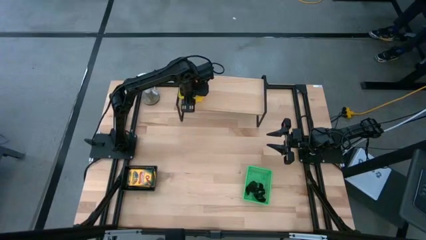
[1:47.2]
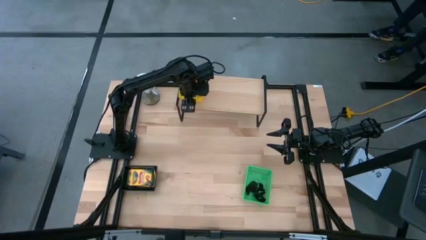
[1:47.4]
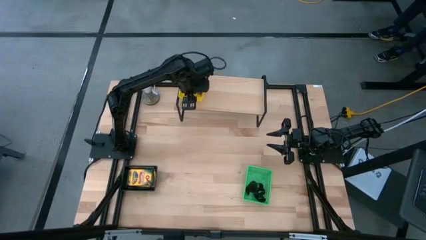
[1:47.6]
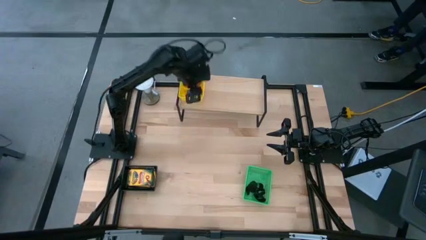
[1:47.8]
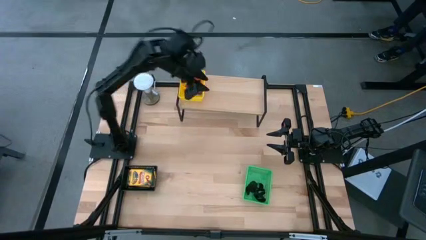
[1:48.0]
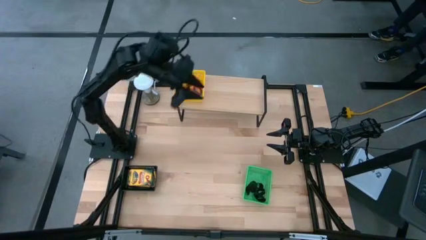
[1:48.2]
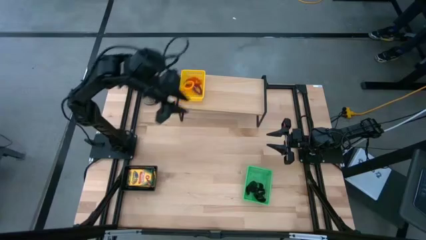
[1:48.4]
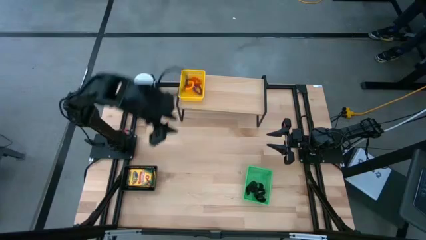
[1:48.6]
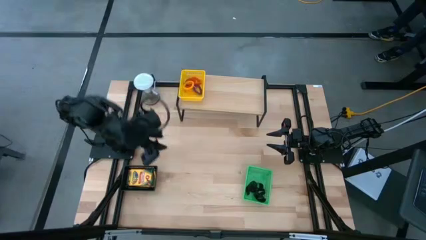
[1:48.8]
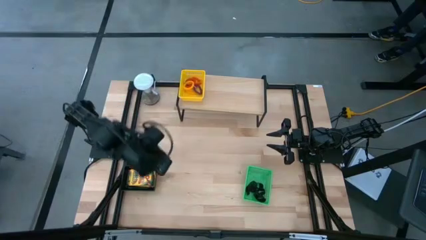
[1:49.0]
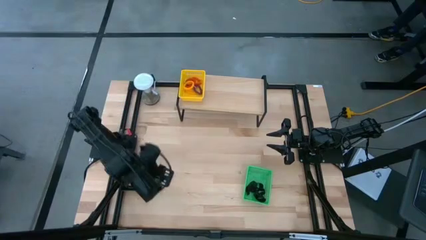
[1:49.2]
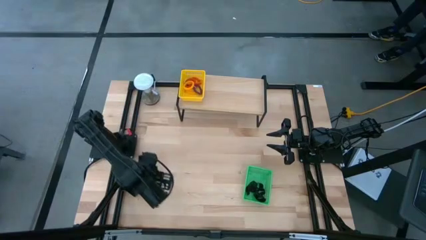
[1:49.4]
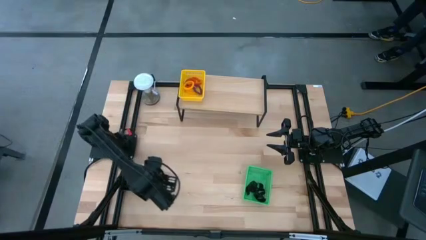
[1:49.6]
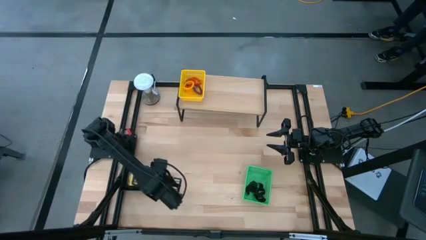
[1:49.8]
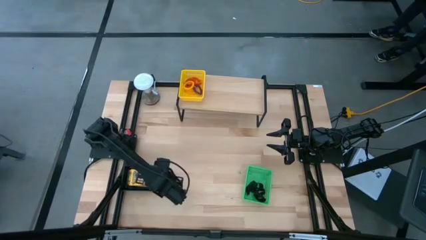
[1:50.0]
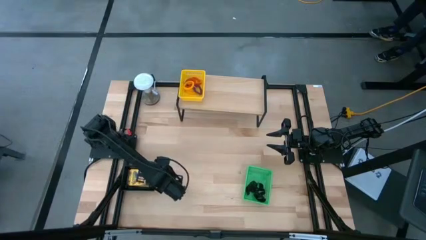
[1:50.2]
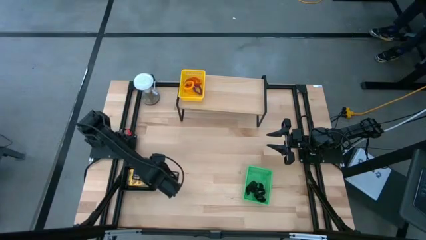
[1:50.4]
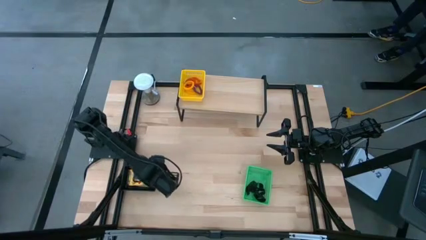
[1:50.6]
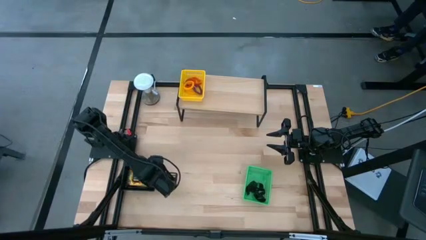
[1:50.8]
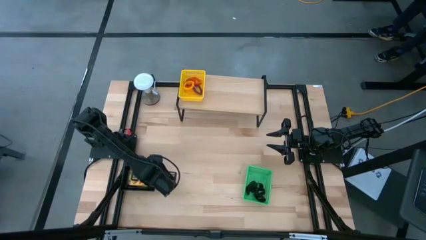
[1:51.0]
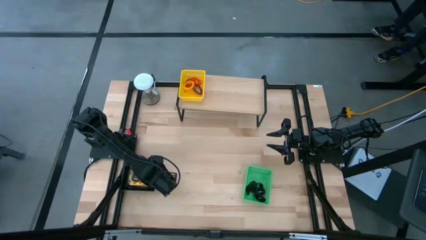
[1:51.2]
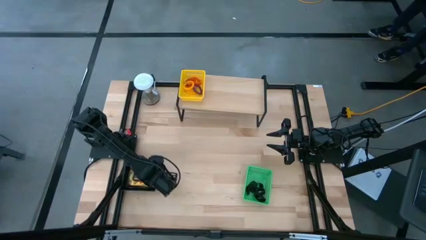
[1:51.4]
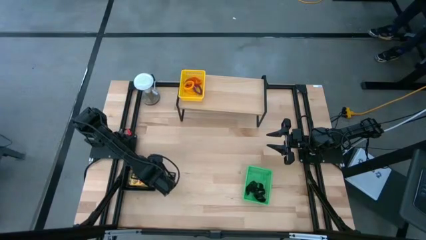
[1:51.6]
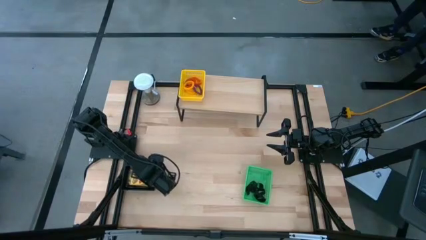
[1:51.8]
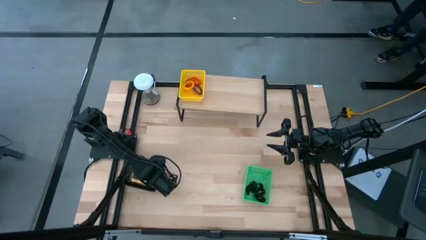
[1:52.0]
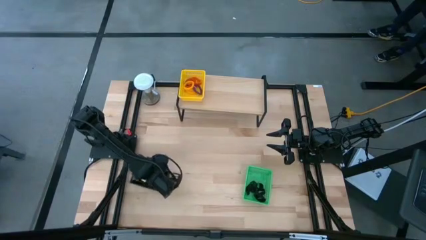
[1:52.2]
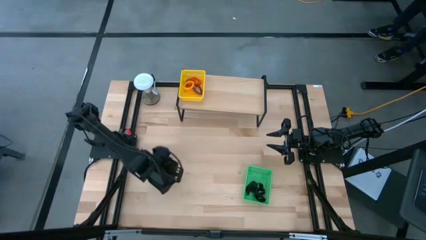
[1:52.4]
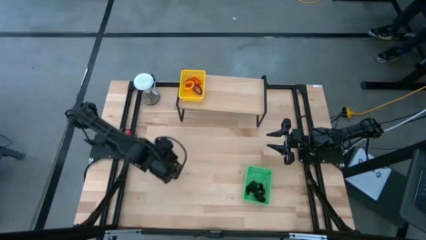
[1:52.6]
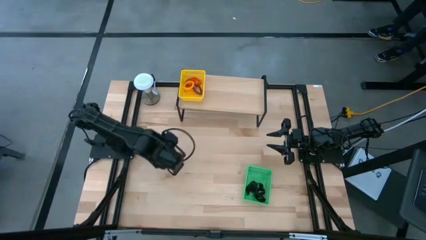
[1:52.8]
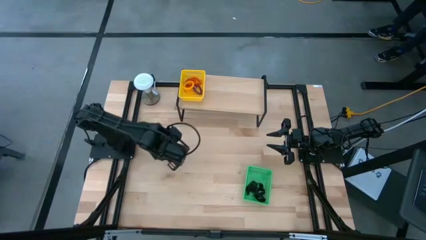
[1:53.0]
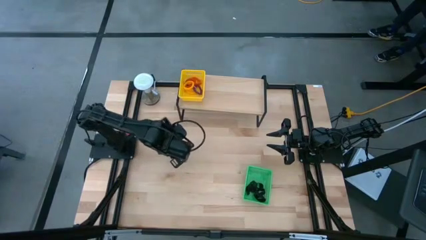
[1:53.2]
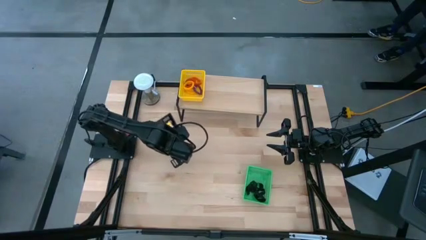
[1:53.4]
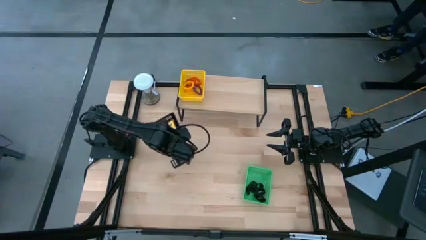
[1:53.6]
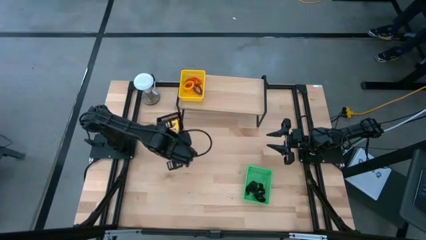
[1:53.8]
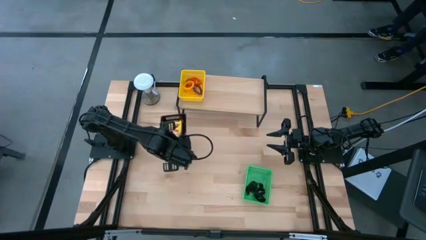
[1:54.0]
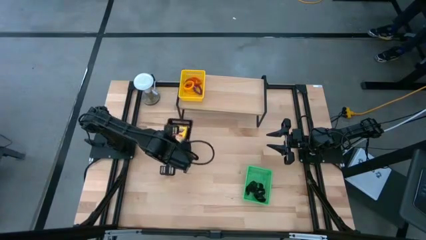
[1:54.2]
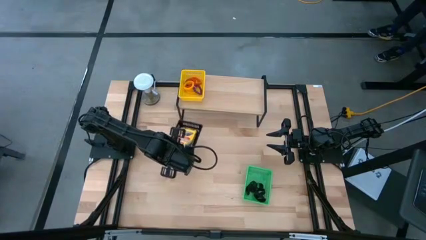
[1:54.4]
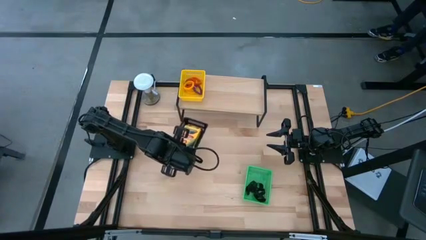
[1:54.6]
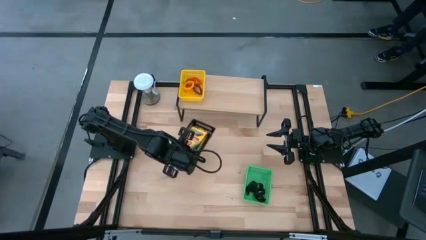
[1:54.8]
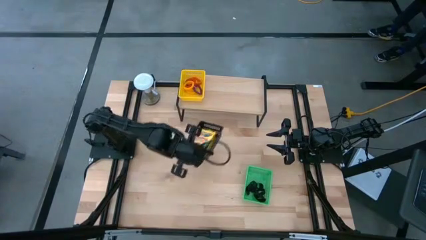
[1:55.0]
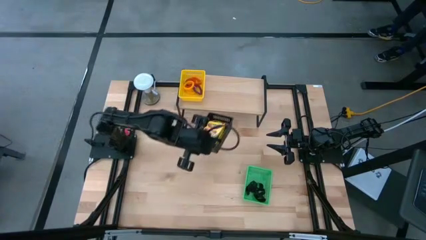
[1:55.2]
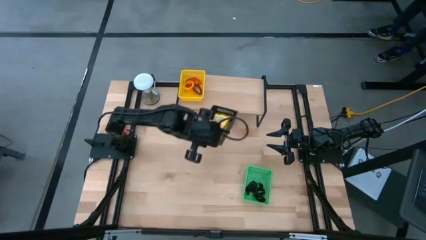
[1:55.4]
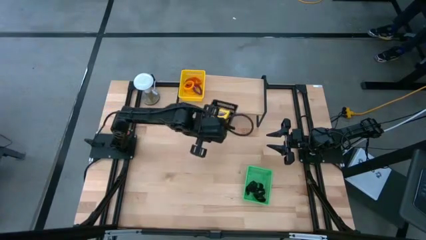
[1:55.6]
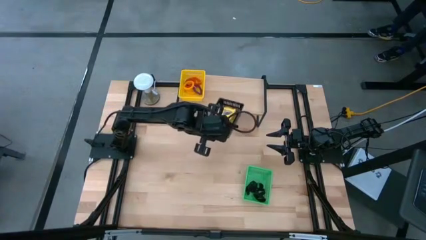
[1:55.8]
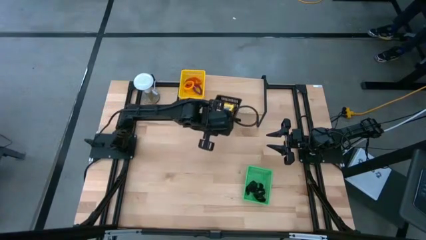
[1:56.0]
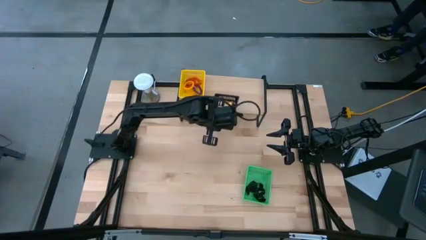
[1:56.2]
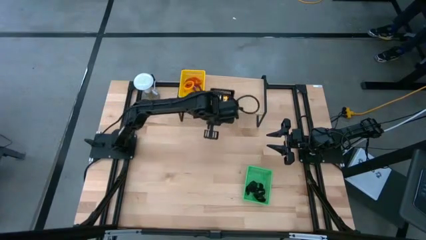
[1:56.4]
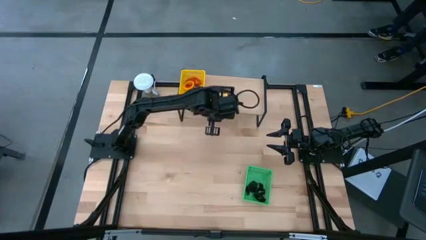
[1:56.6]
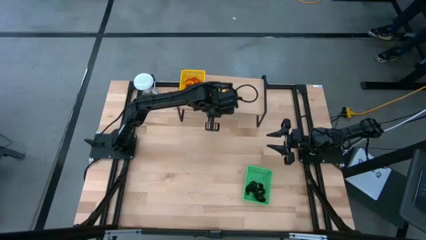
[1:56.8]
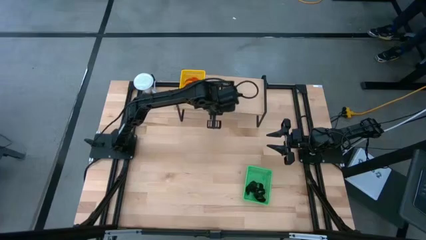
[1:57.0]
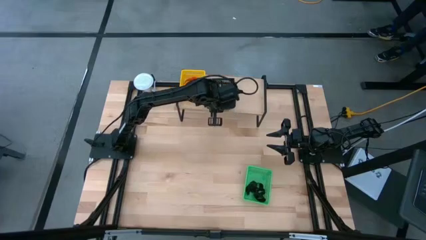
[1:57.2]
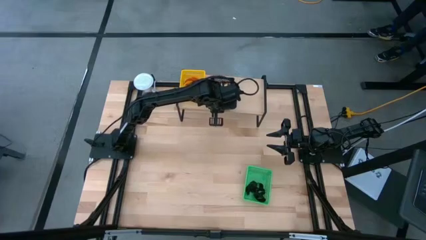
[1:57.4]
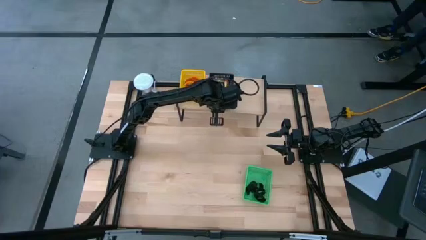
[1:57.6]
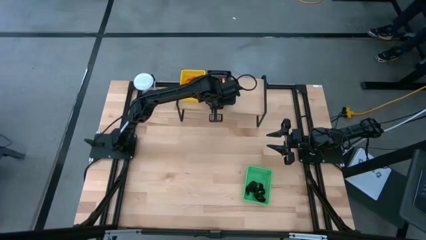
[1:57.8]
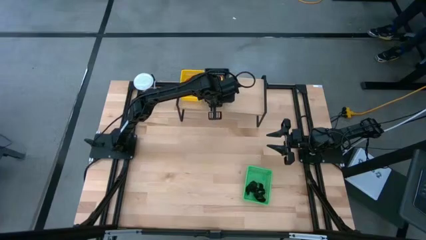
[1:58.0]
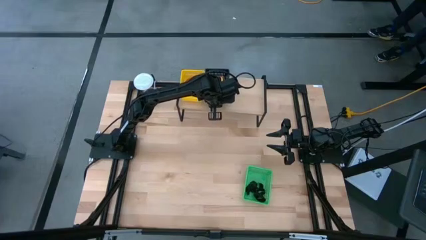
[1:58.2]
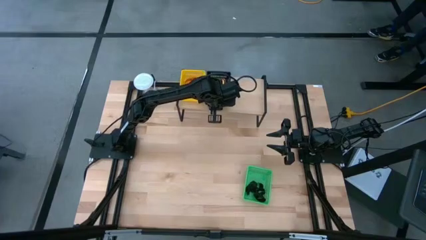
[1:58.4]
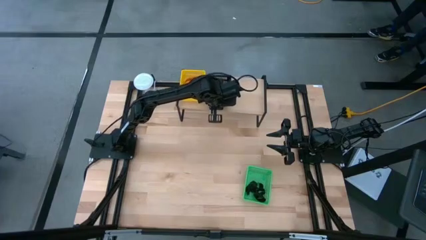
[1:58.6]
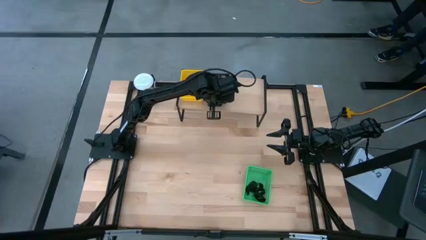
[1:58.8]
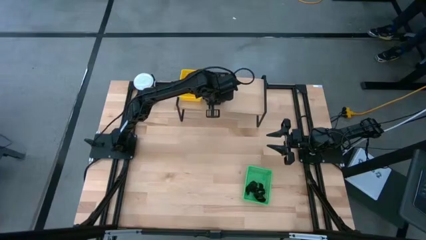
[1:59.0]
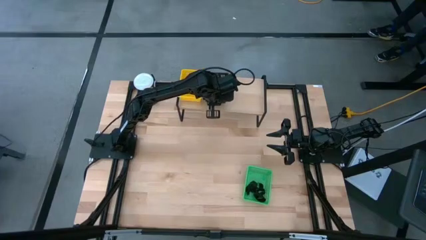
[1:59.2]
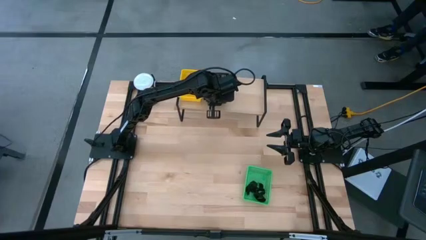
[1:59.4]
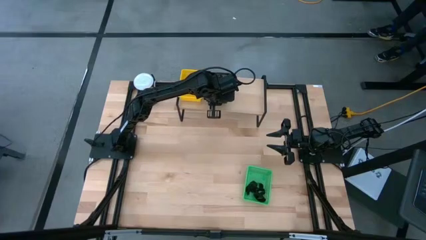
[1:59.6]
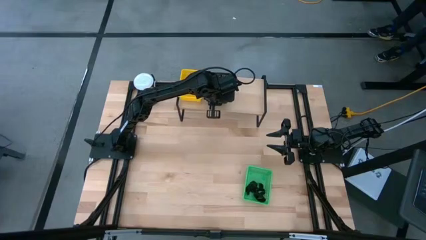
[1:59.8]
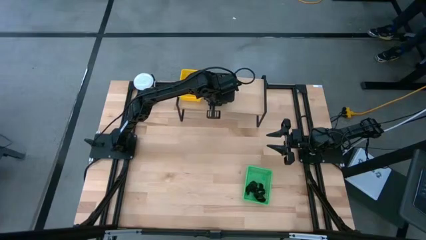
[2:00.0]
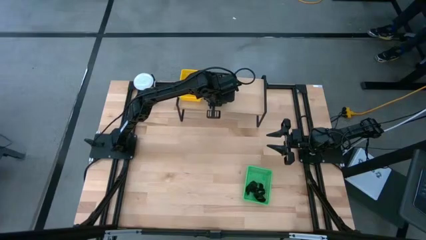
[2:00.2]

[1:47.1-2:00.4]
Task: Pick & Place Office Desk Supplies
Put the black bin with crayon boxes on the shelf

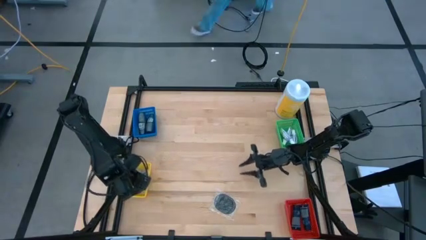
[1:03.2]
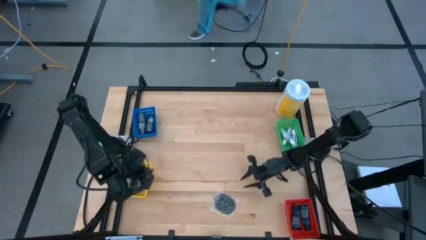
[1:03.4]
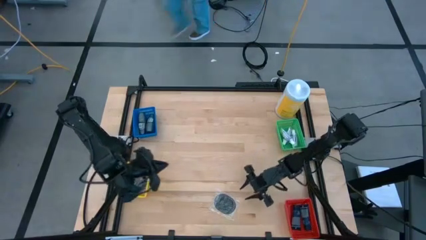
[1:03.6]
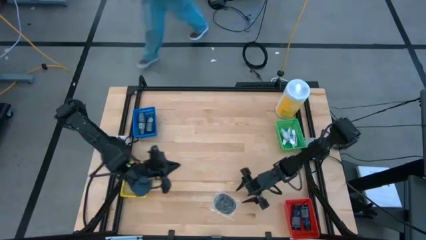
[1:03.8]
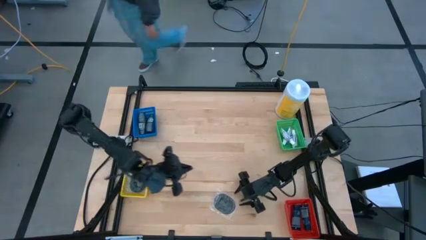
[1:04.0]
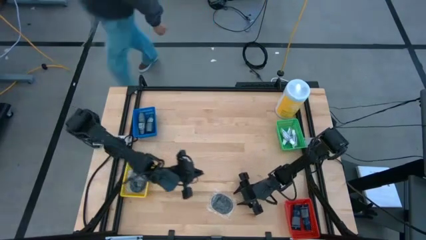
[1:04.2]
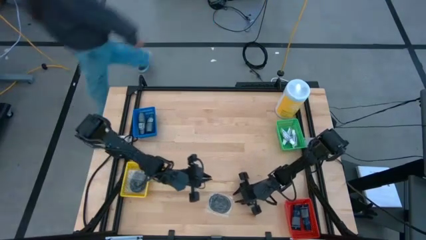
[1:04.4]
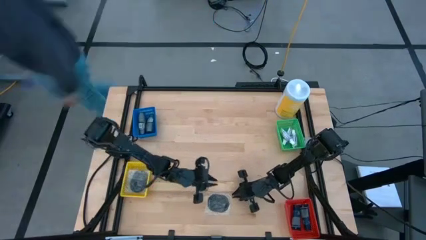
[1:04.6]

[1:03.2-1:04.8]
Task: Pick & Place Travel size toiletries
Put the black hairbrush into the yellow bin
